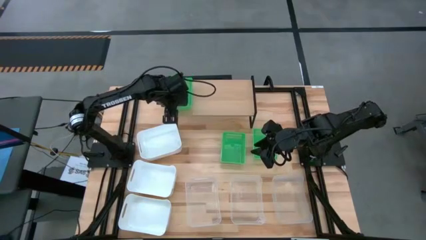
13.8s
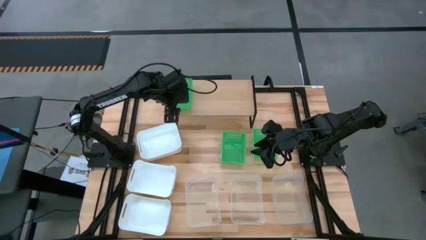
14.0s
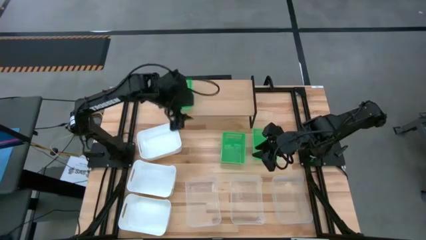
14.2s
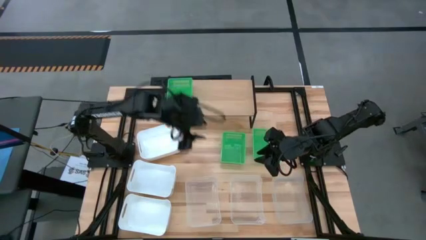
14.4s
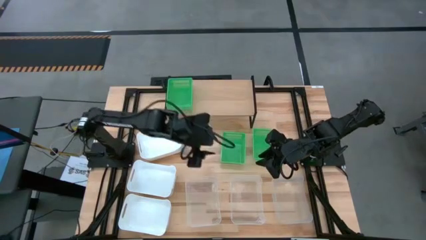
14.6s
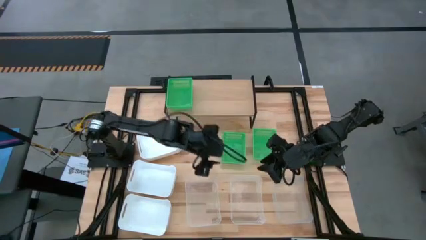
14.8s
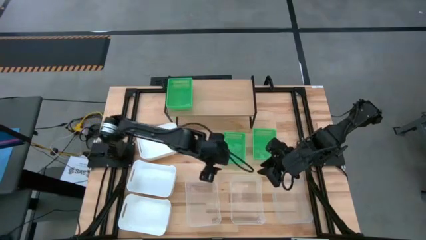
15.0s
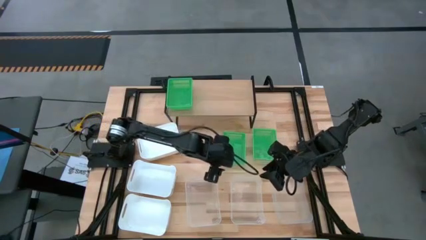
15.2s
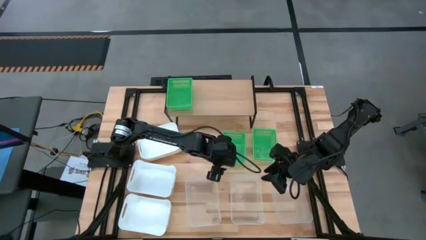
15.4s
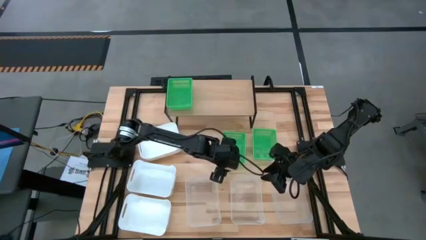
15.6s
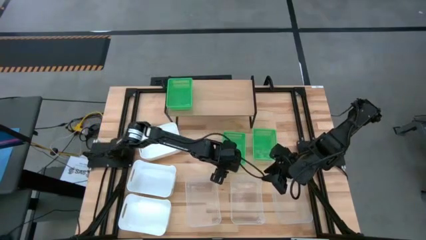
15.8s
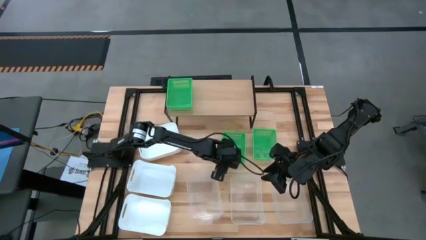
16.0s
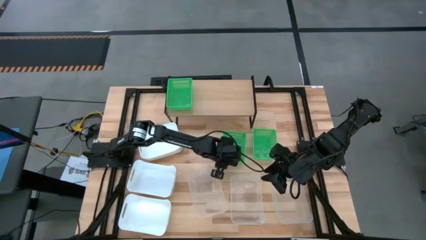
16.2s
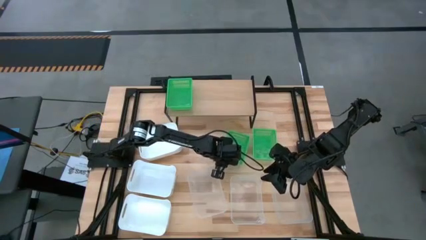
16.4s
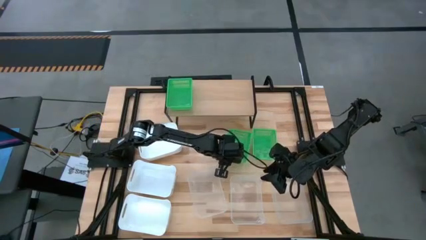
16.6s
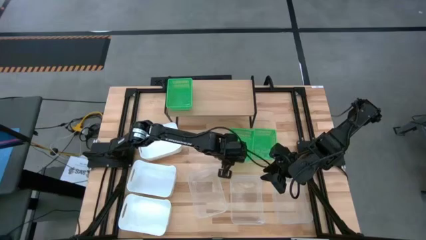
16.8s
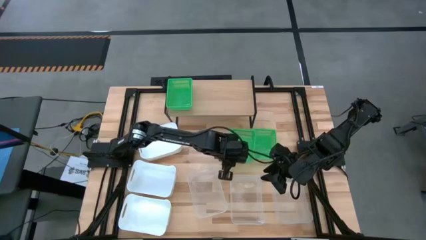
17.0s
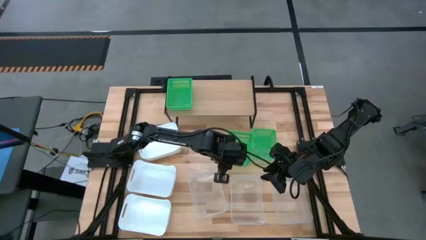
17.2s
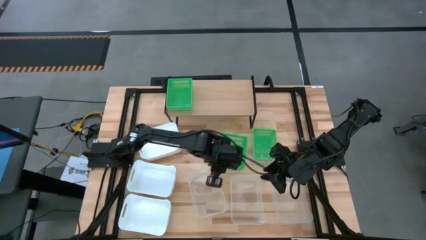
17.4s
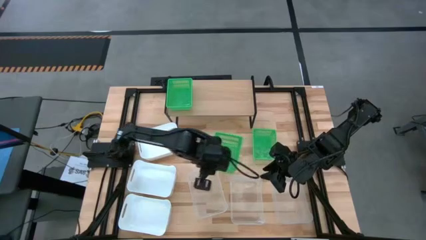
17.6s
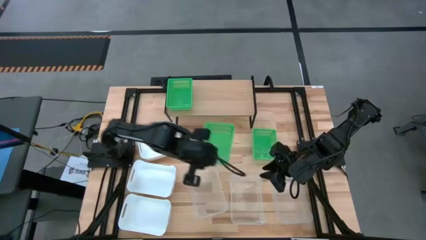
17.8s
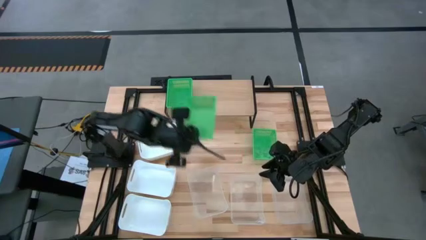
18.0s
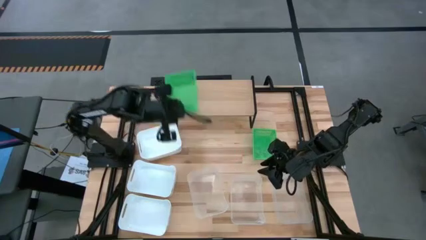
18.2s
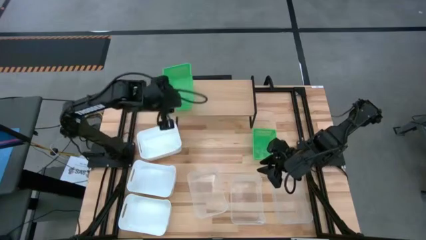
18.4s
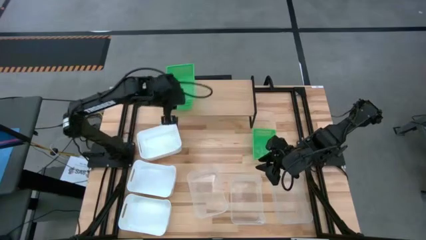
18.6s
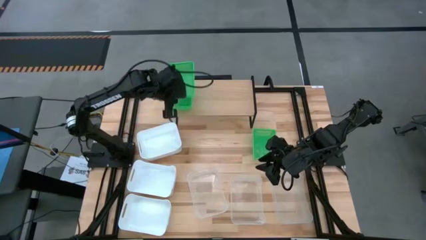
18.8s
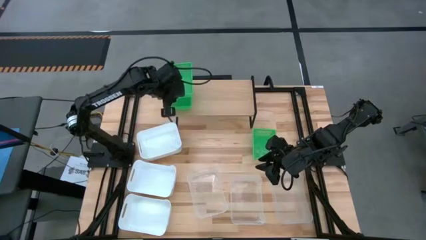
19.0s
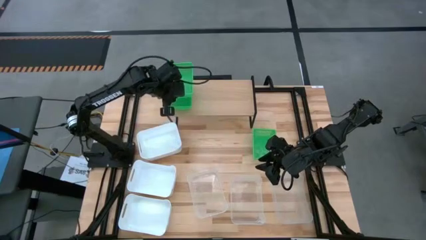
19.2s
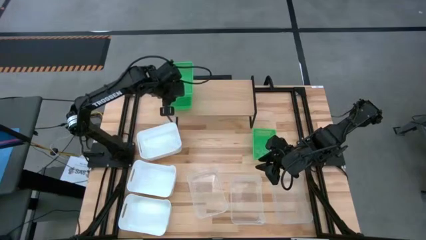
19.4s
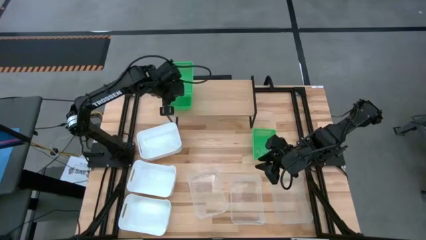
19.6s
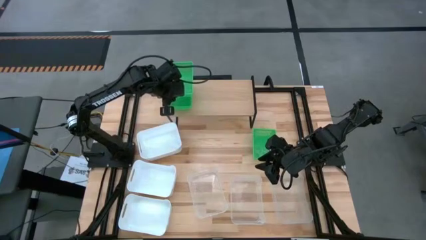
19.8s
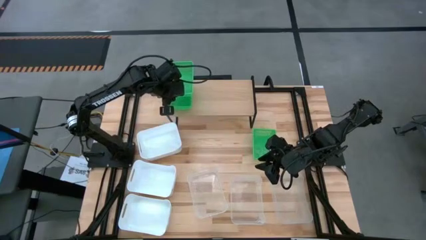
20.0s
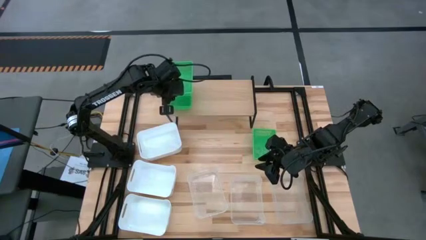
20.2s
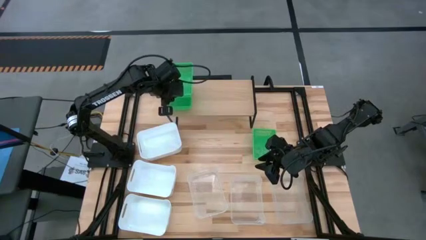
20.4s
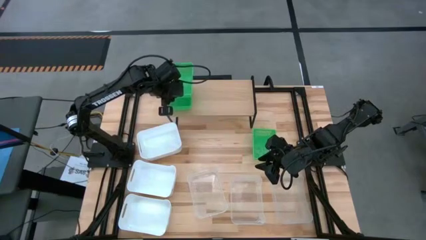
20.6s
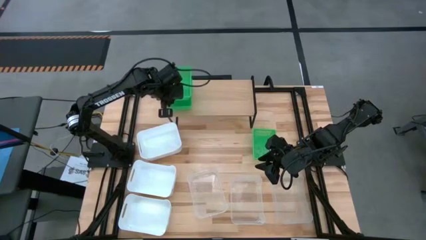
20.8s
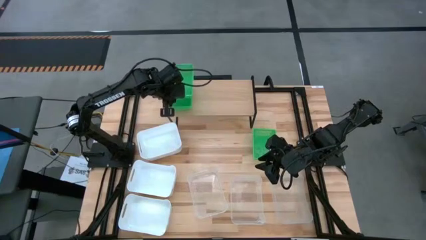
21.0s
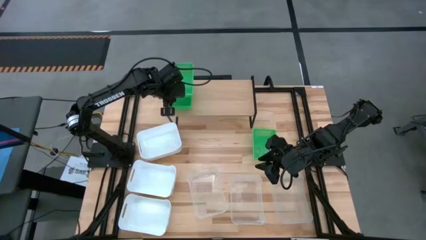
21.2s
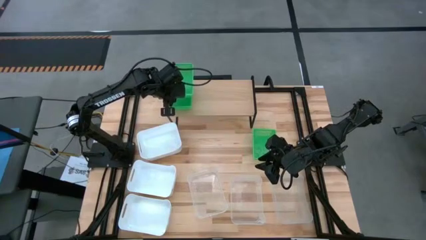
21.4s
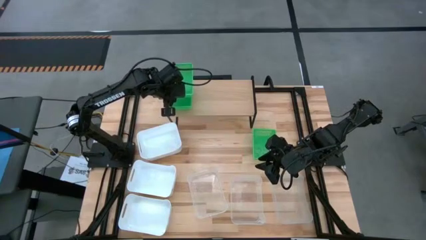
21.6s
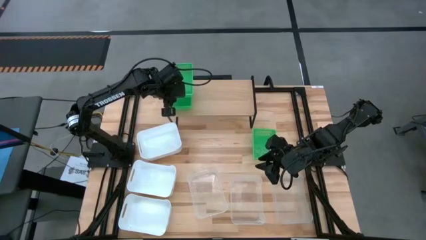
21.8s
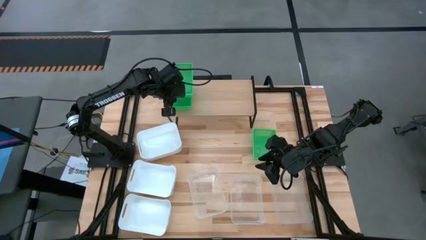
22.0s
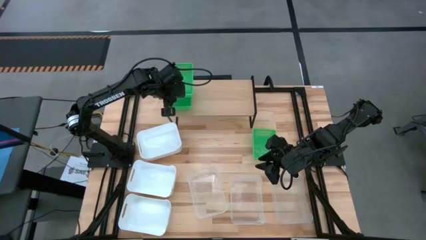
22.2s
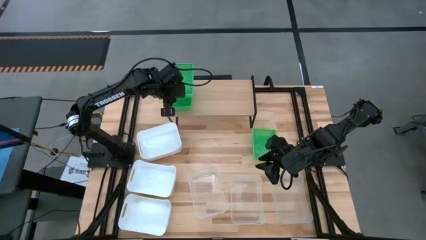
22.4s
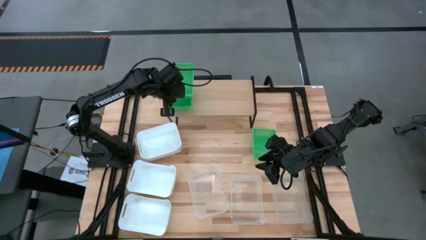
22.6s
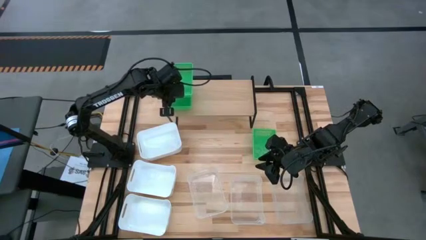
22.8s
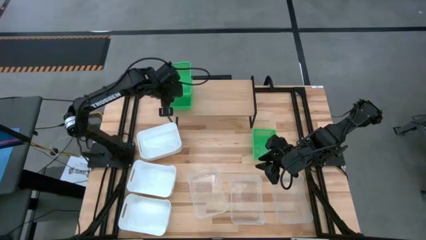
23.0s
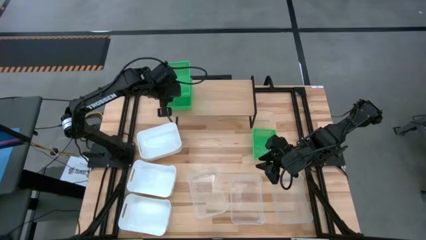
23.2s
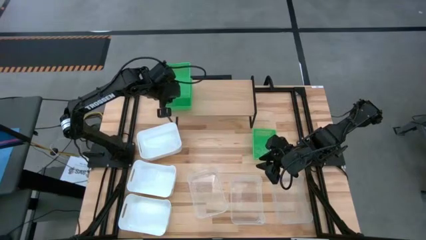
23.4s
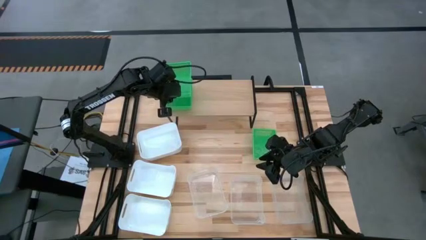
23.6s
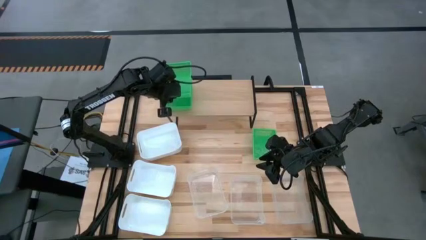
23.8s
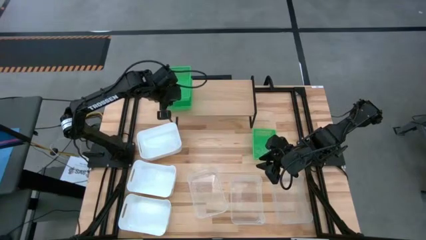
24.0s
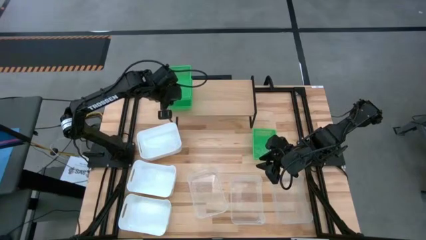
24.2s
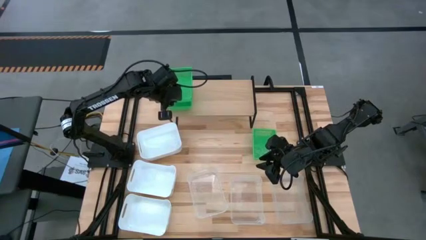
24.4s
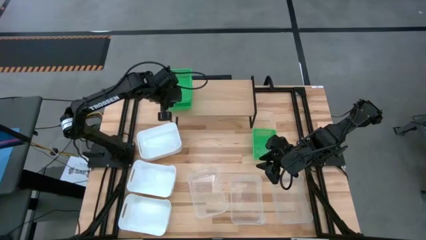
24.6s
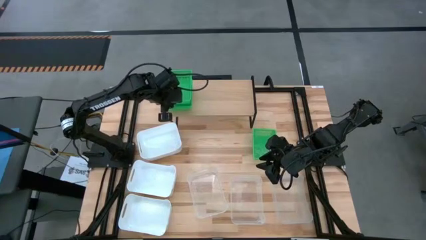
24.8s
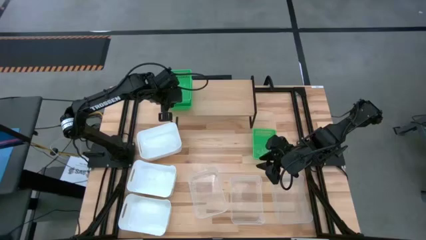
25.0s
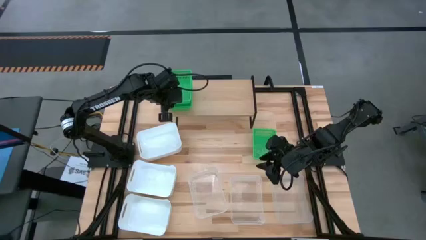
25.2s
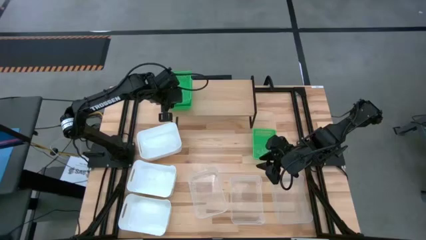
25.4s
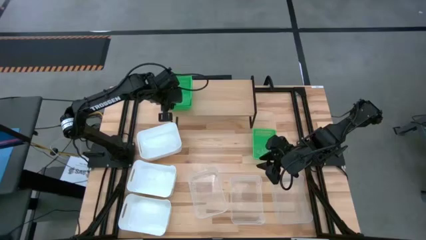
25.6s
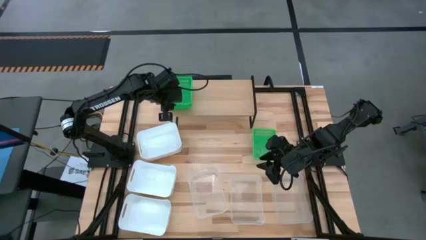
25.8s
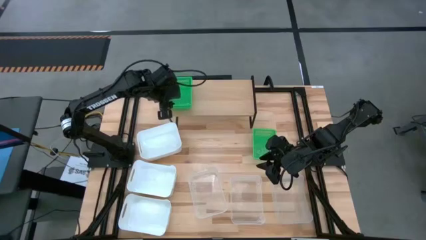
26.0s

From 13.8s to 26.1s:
Task: Stack baskets on shelf by color
Stack the left green bin on top of the green bin on the shelf

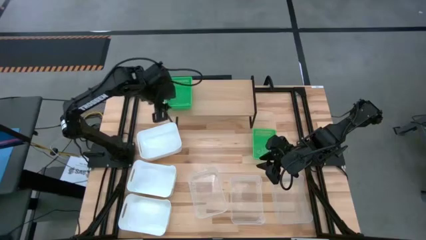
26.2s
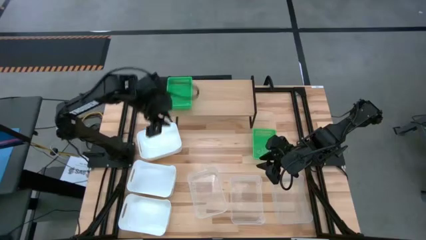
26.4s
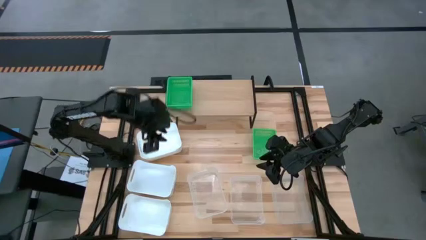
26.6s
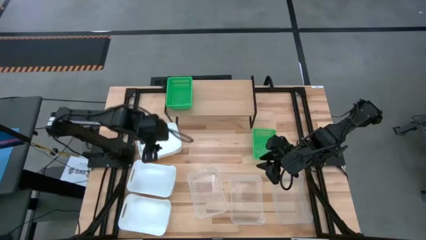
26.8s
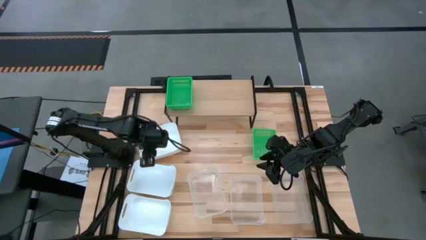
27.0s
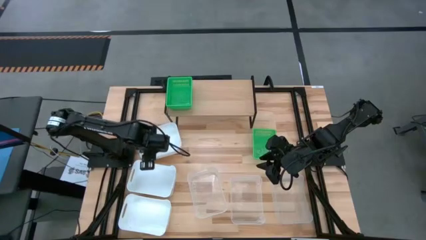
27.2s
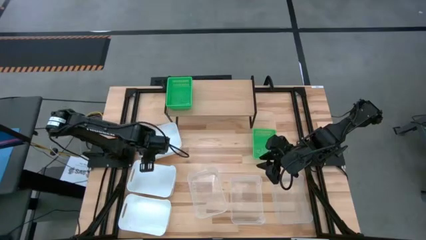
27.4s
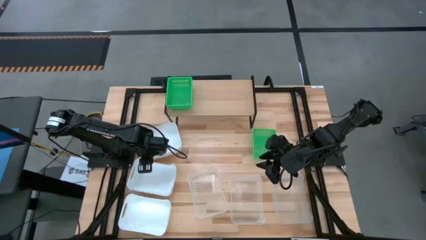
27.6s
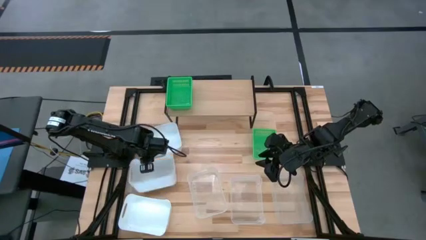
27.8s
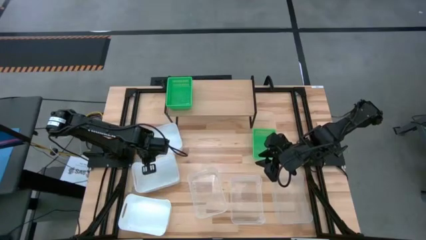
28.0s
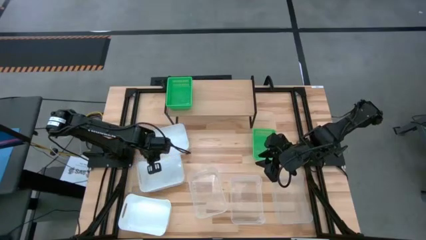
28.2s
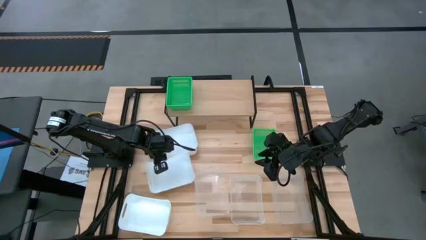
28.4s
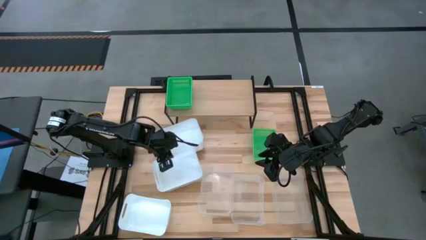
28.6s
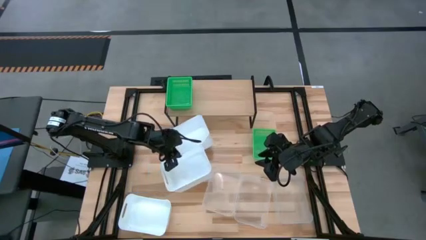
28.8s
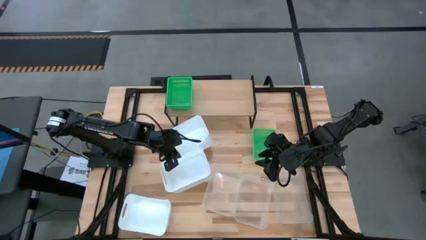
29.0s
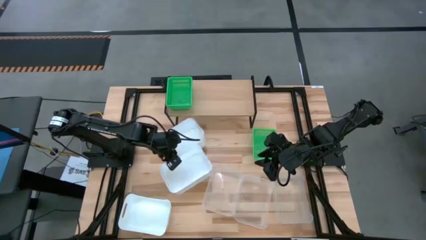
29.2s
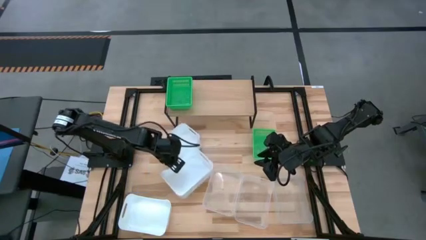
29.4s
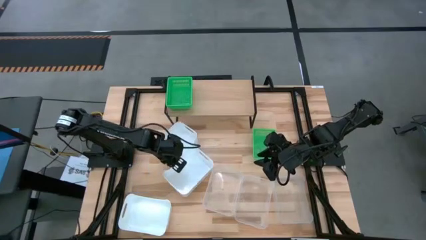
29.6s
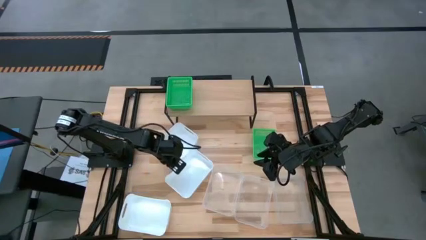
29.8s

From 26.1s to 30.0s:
Put the top white bin on the shelf
